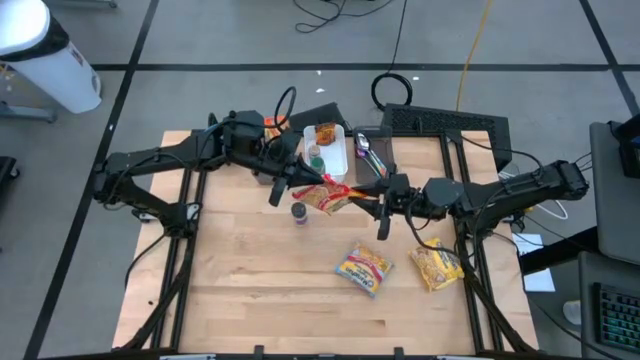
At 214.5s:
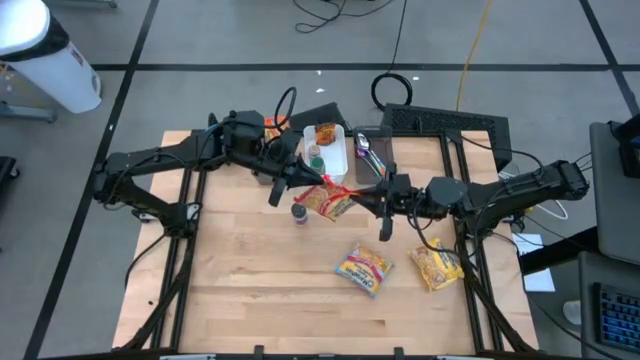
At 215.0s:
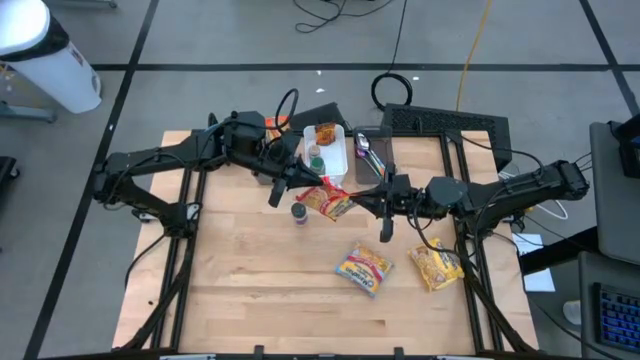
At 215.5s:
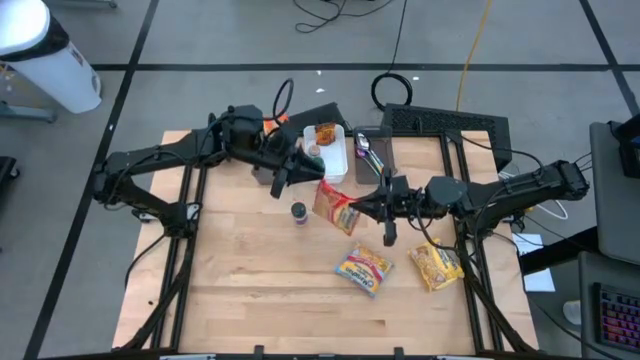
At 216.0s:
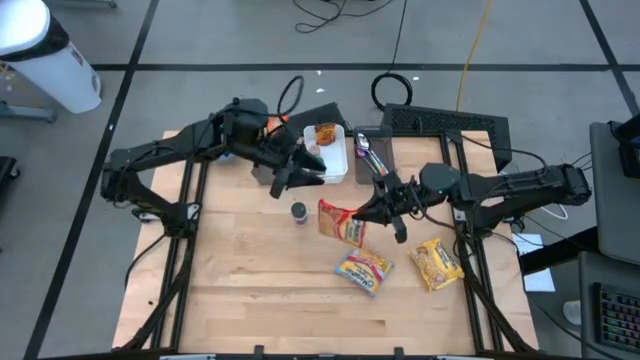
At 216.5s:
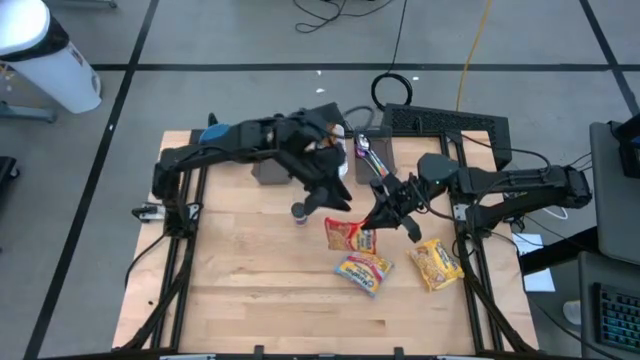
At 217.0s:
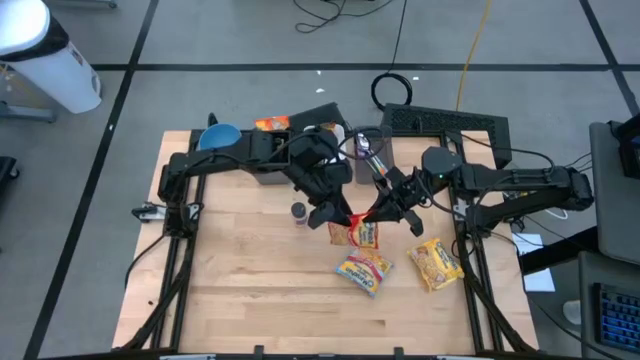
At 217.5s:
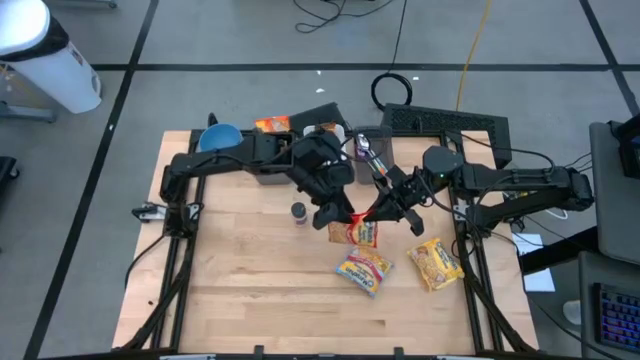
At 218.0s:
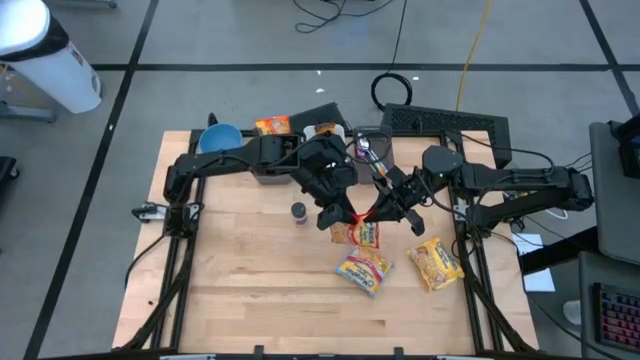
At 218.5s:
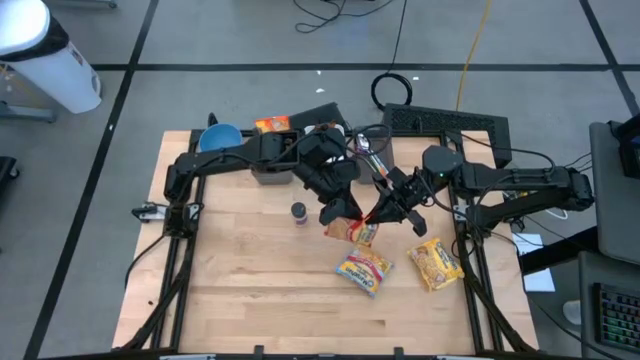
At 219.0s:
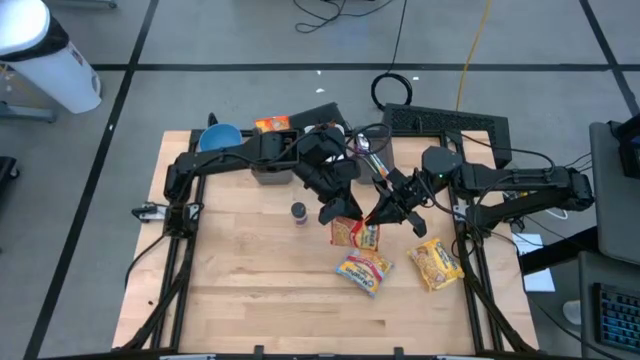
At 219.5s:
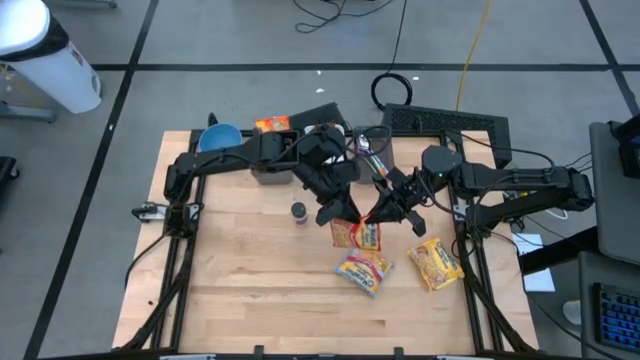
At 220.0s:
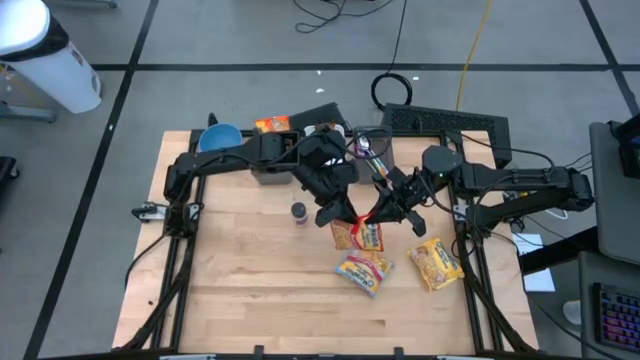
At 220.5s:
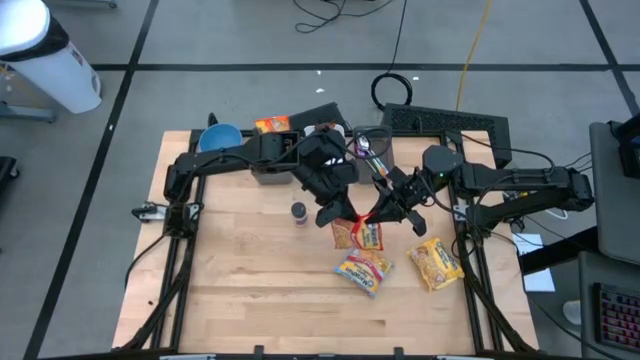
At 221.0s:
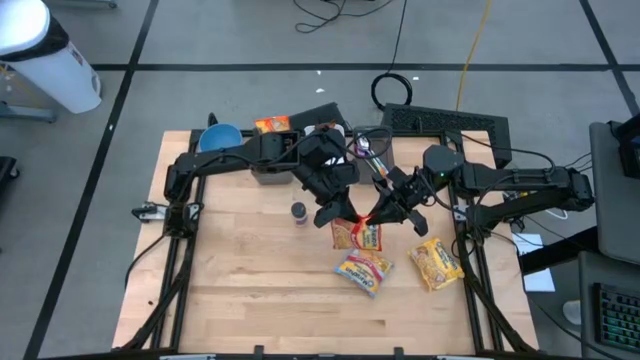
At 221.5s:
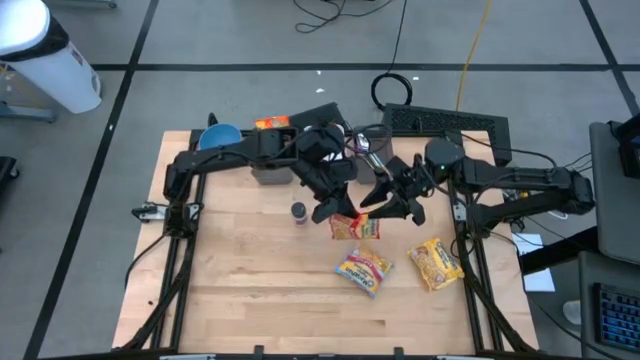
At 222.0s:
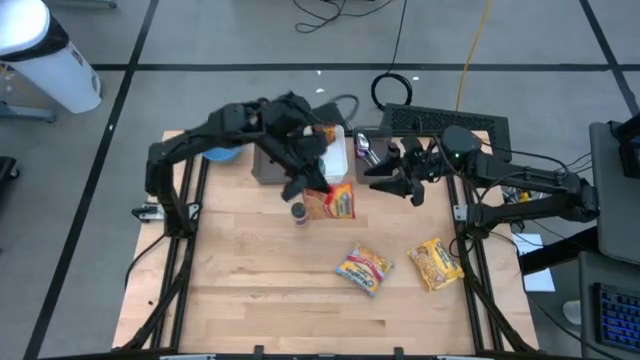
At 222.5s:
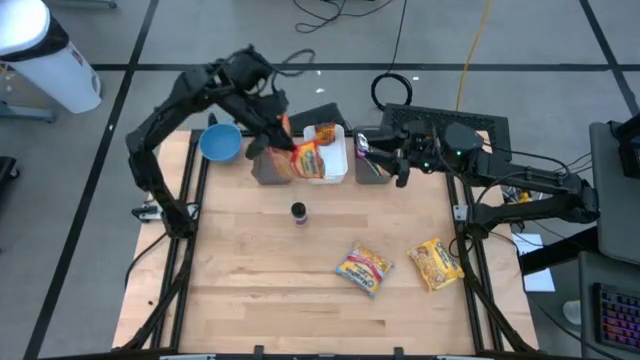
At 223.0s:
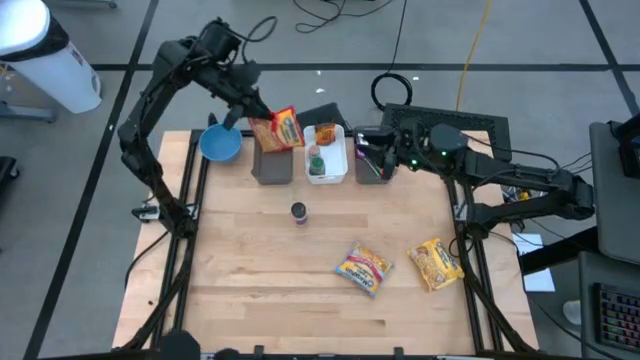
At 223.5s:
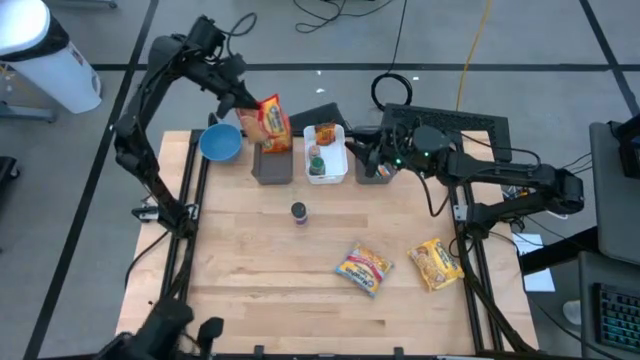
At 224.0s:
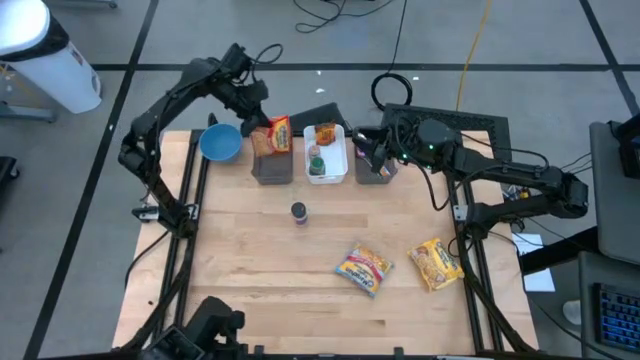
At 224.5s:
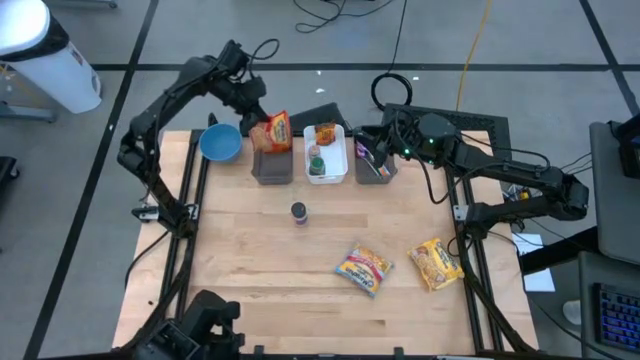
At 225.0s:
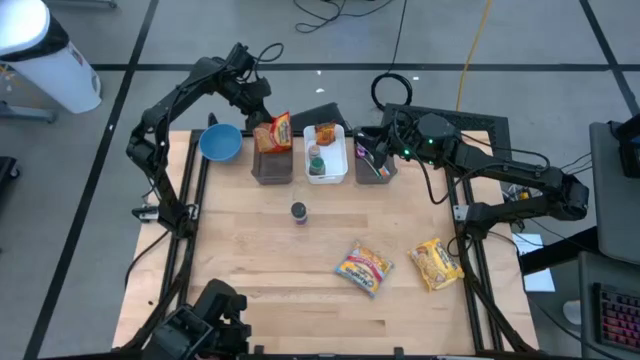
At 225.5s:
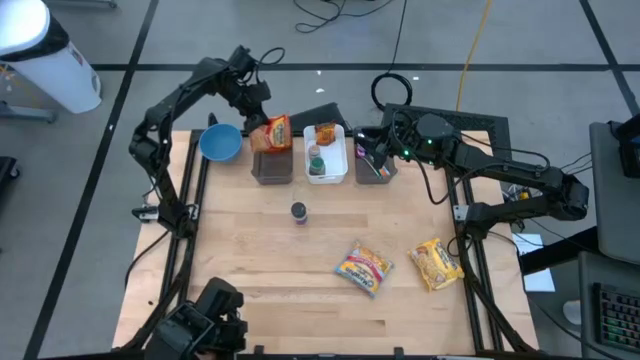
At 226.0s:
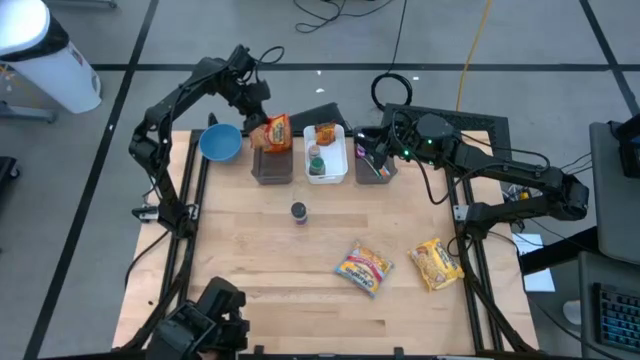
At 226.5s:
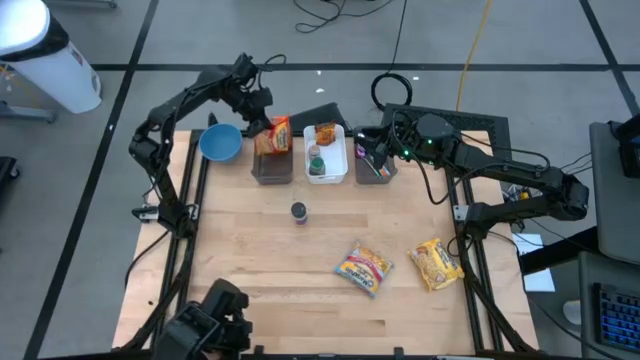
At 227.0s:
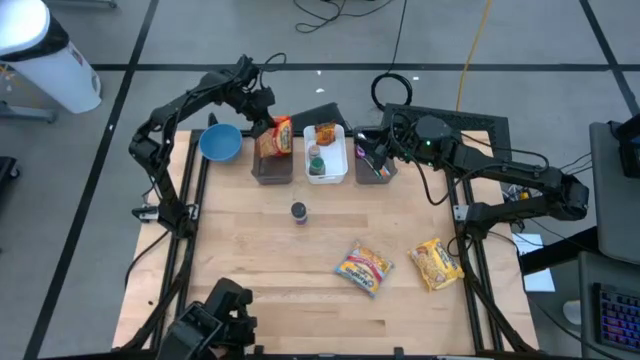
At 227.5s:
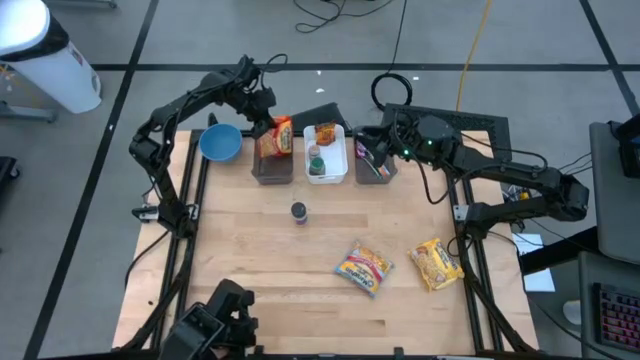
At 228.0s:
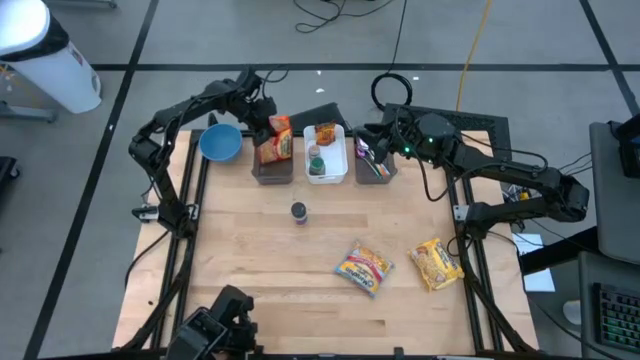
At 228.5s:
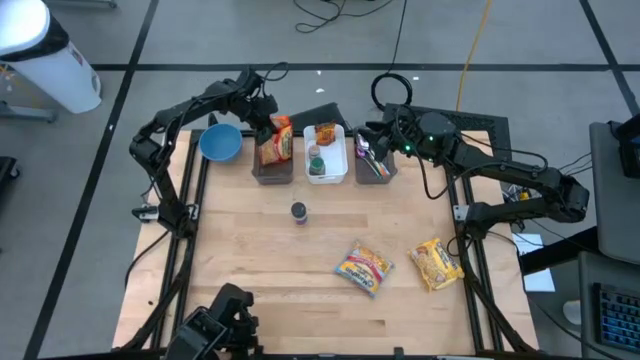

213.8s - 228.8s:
Task: Pick & Place Food Item
Put the red noodle pack into the left black bin
